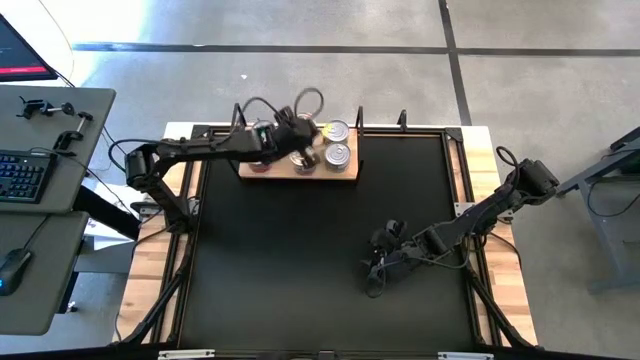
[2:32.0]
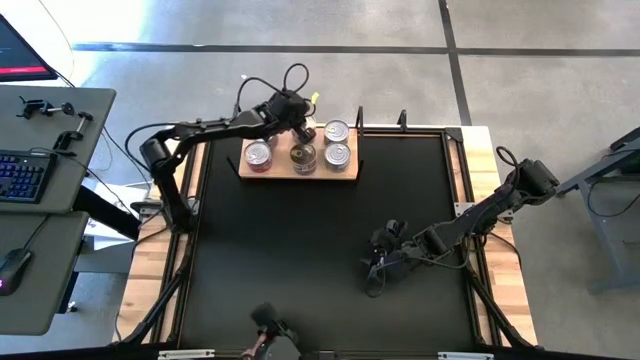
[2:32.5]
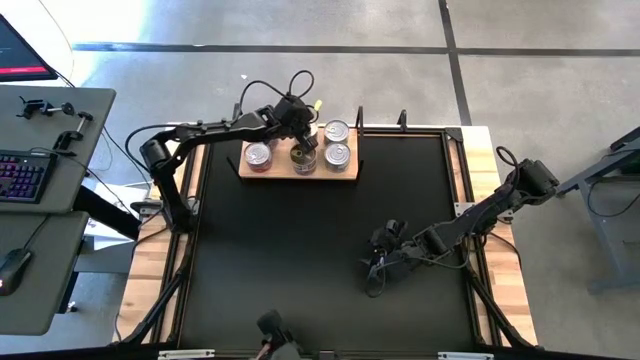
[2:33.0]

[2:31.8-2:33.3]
Task: Stack canned seafood by type on shelf
Adjust the blue and pink tuna cans on the shelf

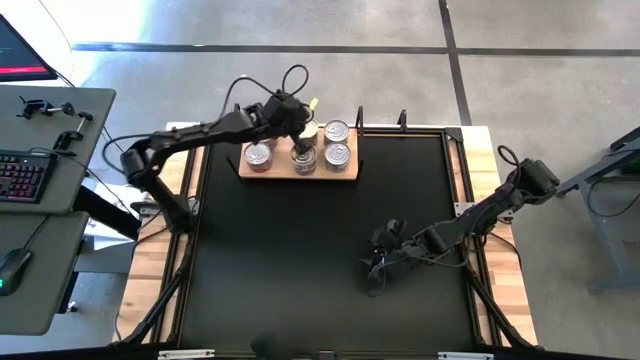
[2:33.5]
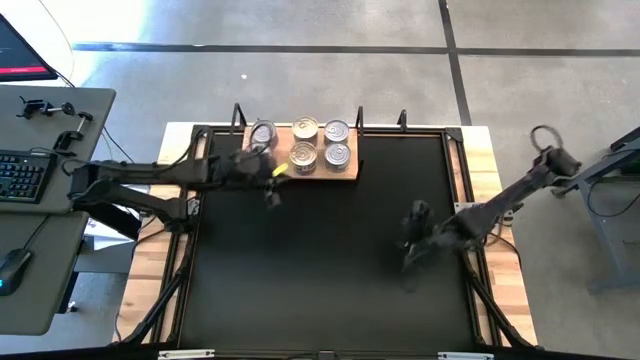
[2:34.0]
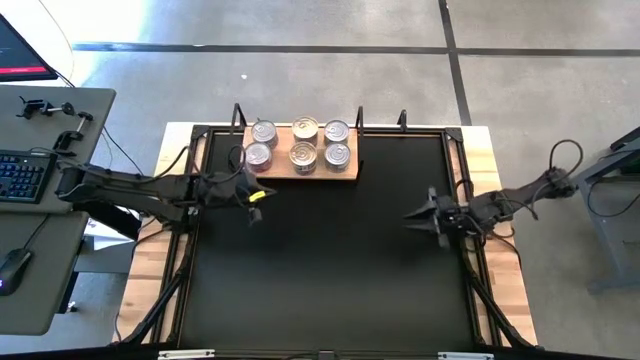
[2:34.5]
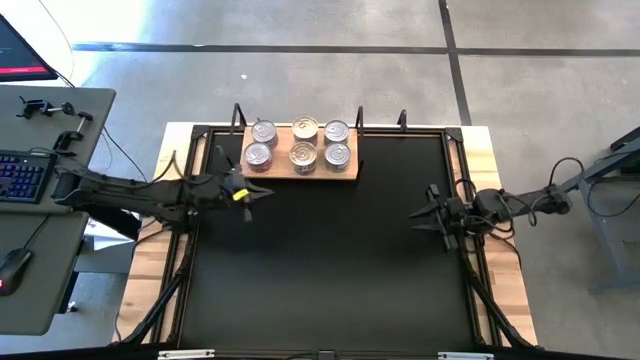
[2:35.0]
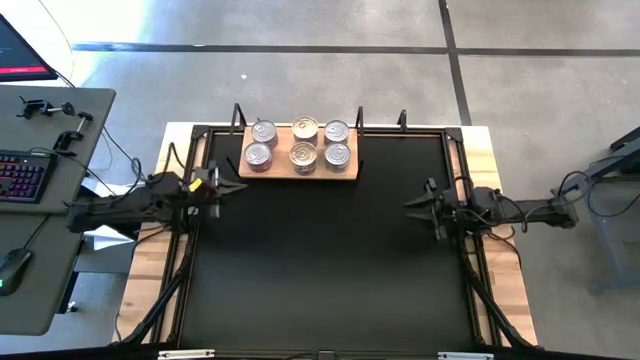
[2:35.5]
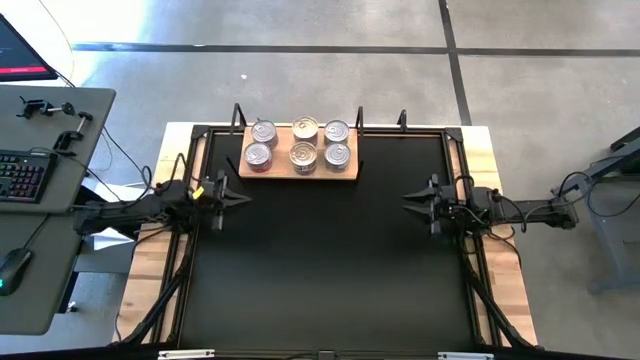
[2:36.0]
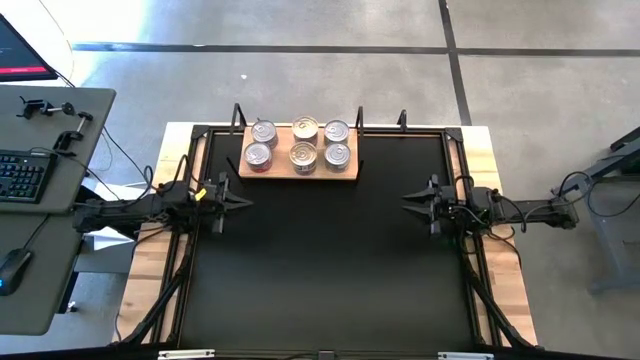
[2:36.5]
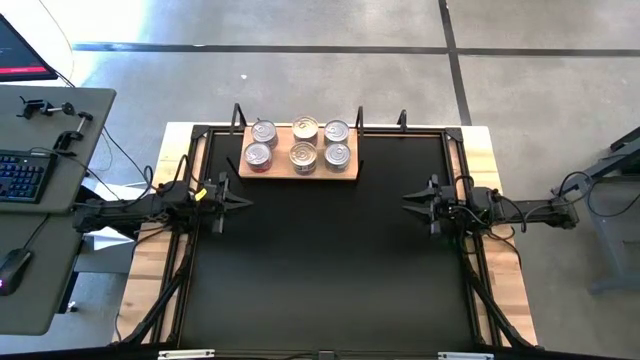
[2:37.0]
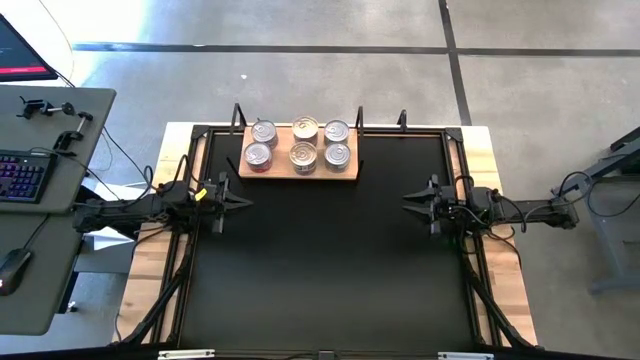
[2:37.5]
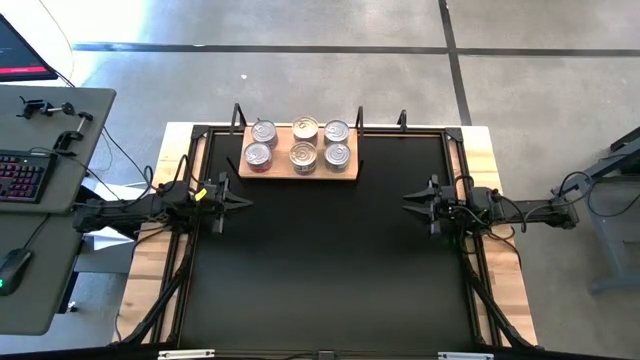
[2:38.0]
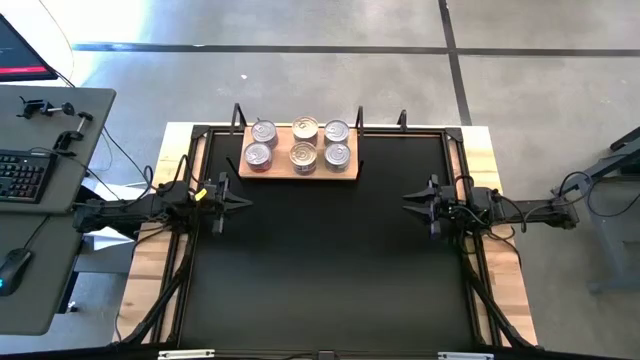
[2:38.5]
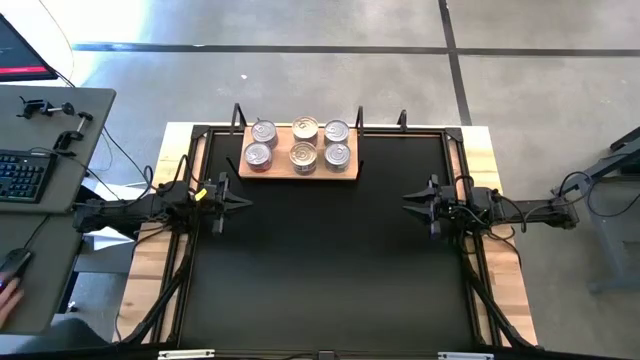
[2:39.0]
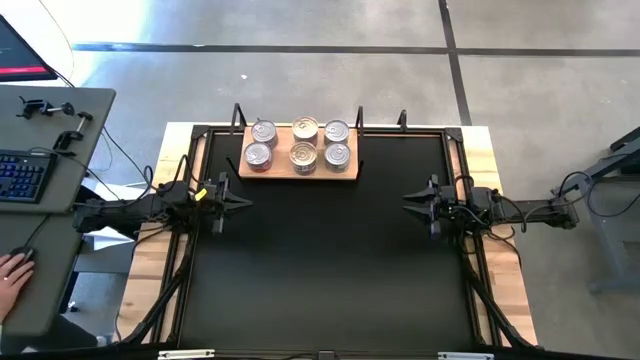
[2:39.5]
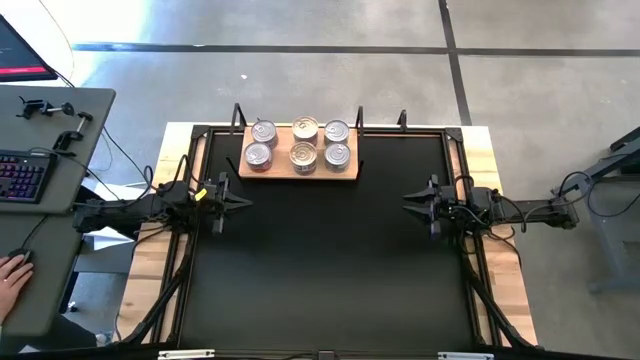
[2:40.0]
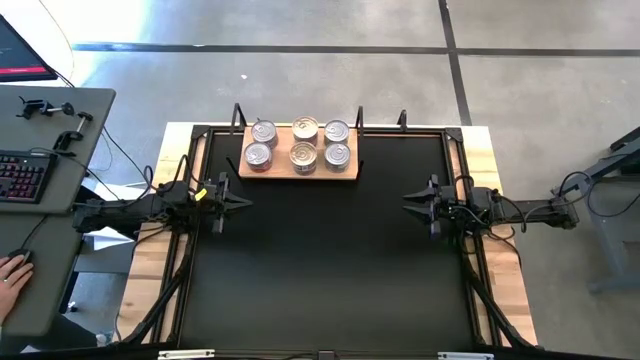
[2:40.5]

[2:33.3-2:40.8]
Return to Home Position

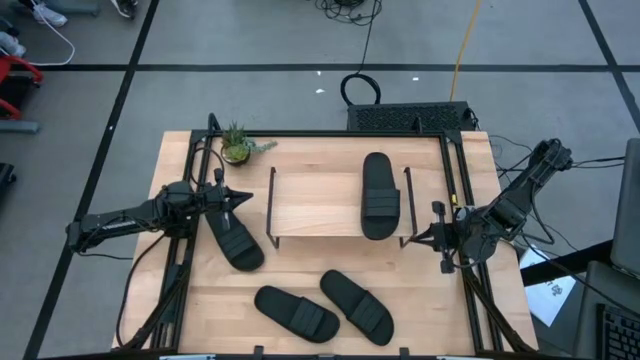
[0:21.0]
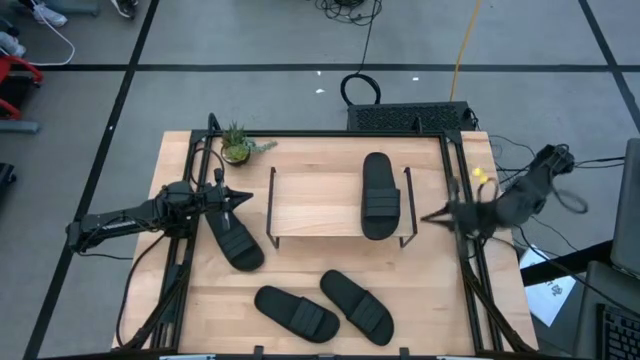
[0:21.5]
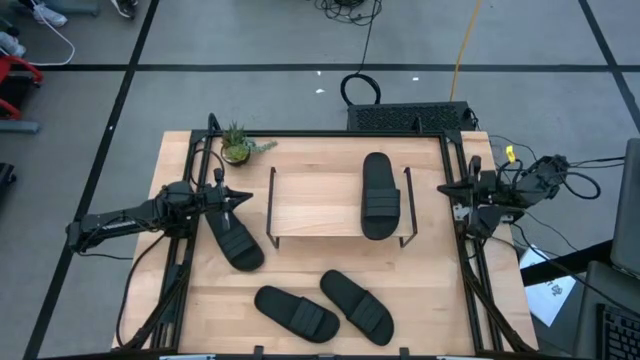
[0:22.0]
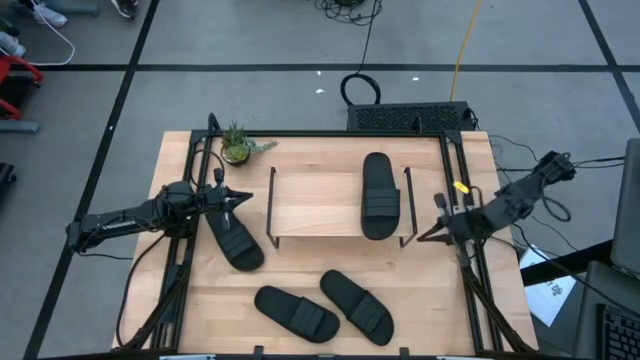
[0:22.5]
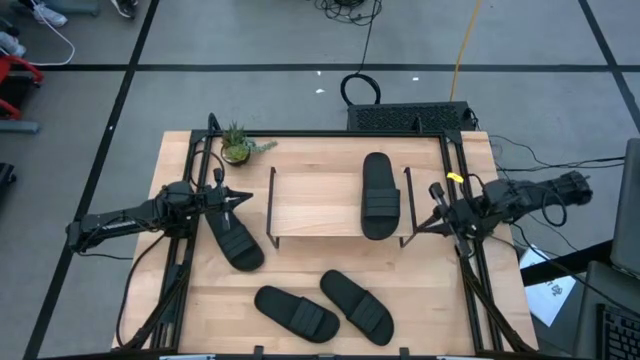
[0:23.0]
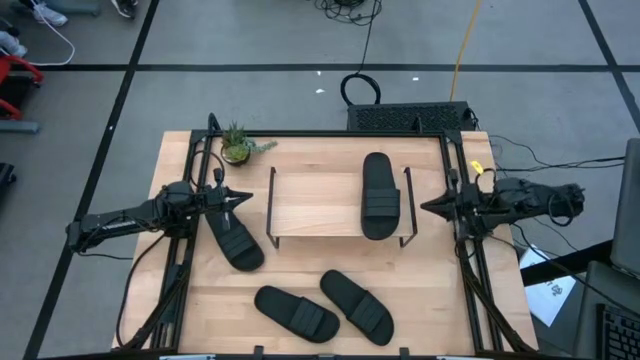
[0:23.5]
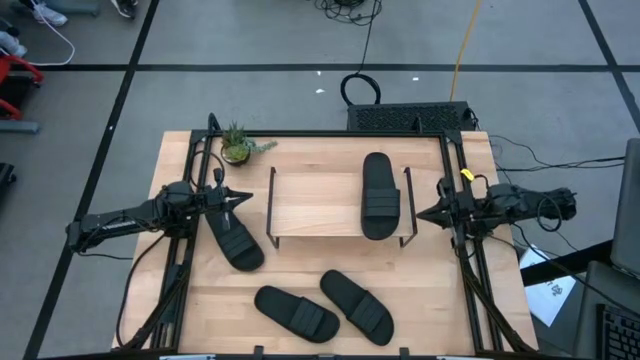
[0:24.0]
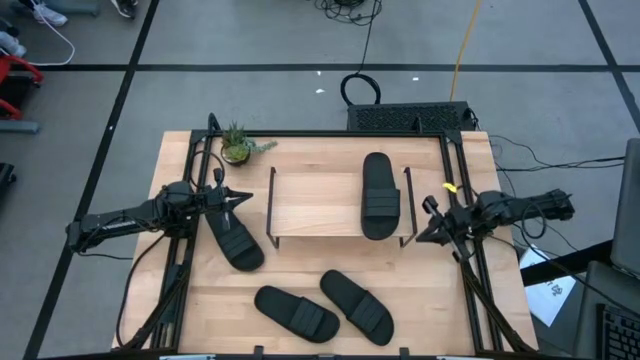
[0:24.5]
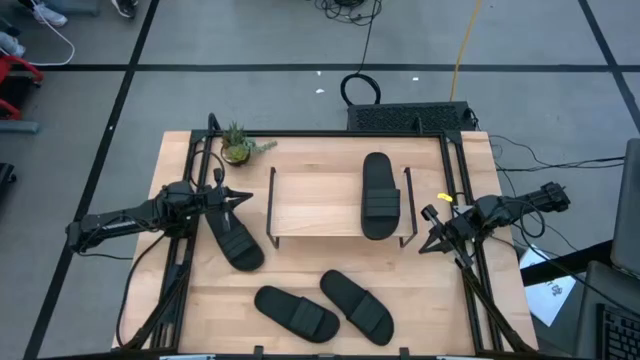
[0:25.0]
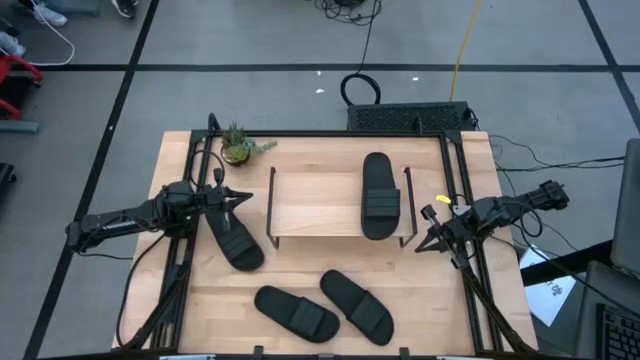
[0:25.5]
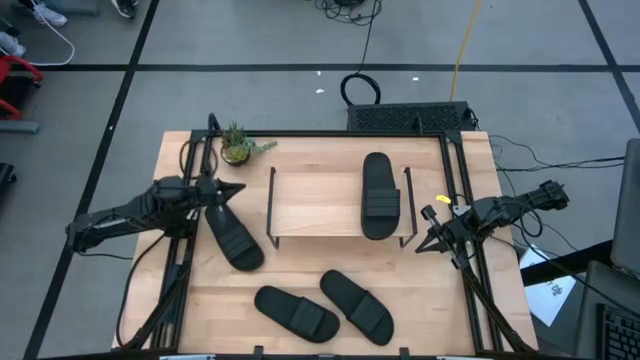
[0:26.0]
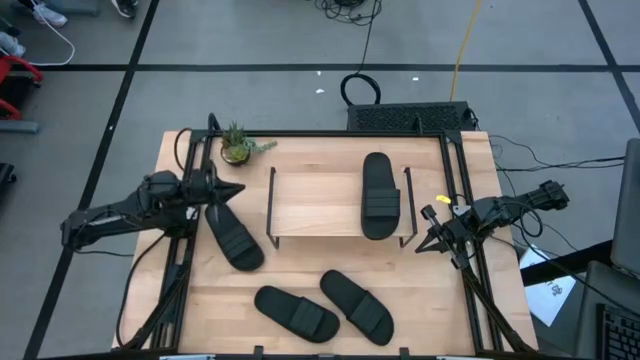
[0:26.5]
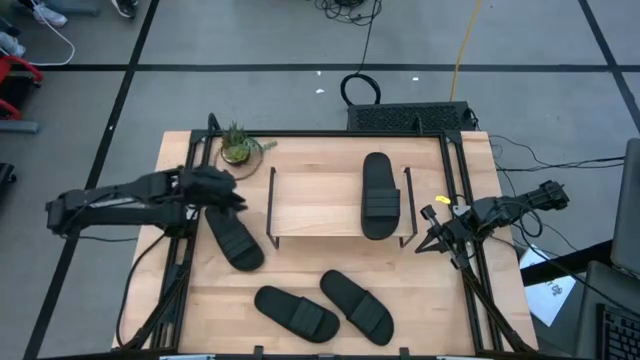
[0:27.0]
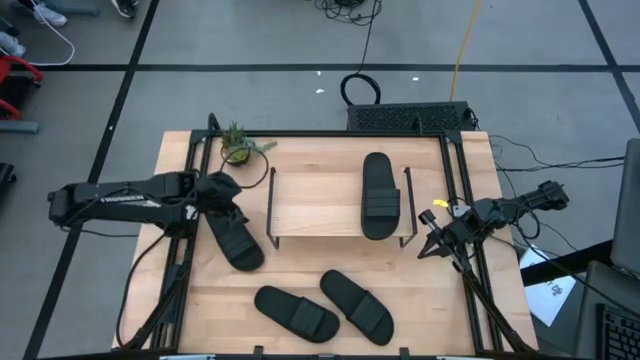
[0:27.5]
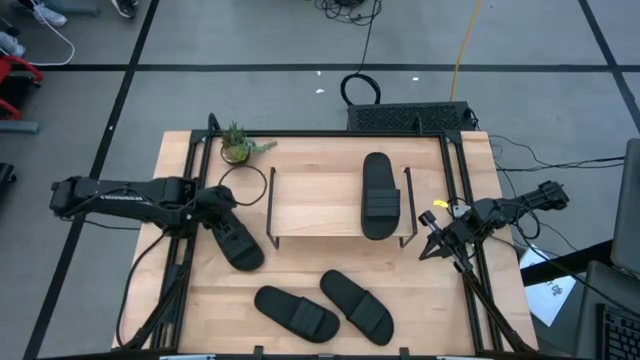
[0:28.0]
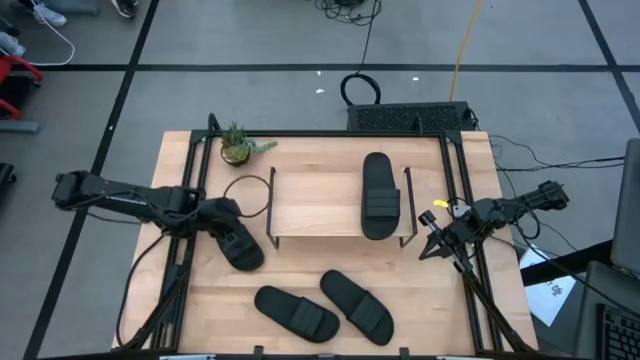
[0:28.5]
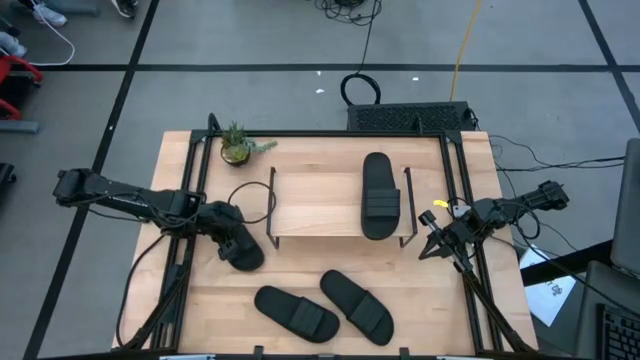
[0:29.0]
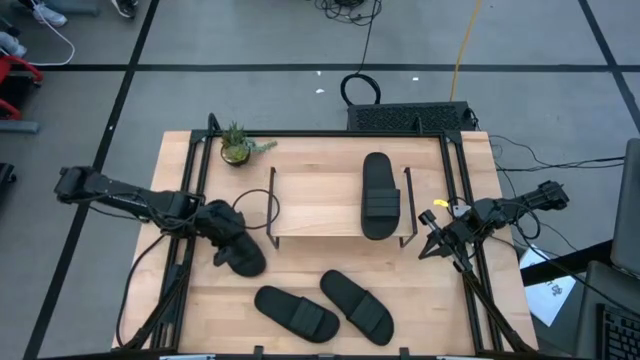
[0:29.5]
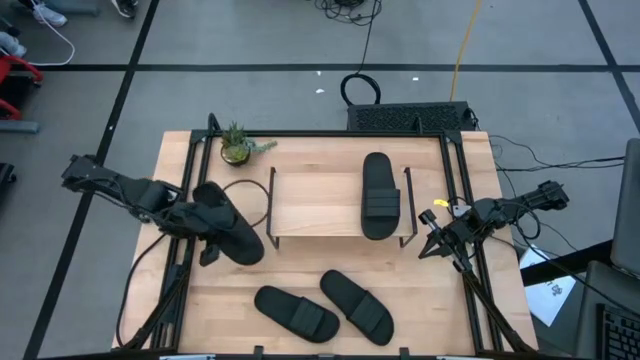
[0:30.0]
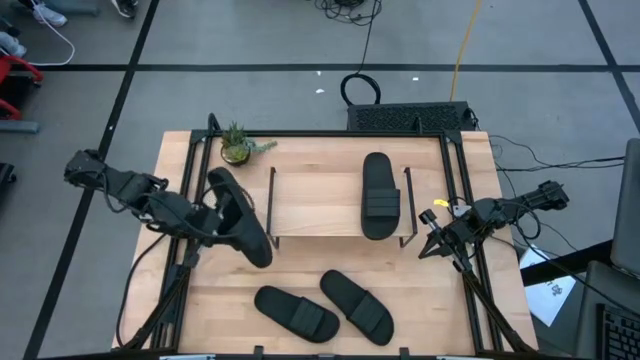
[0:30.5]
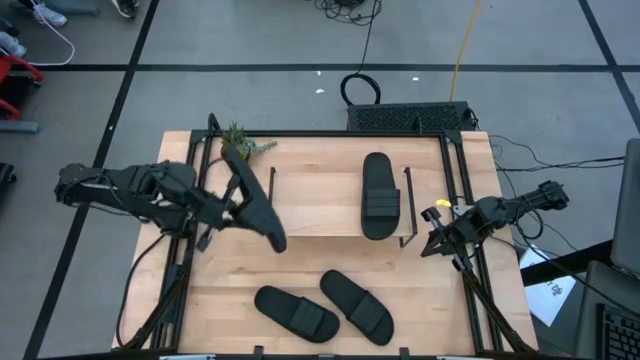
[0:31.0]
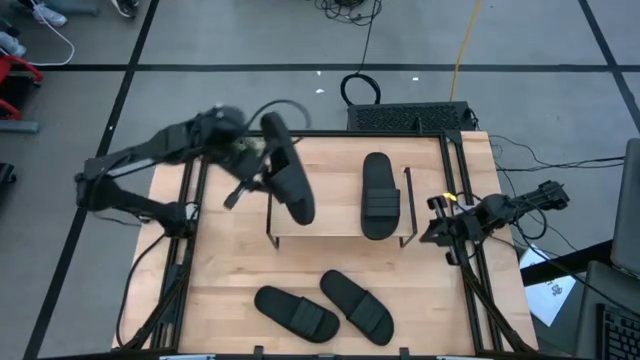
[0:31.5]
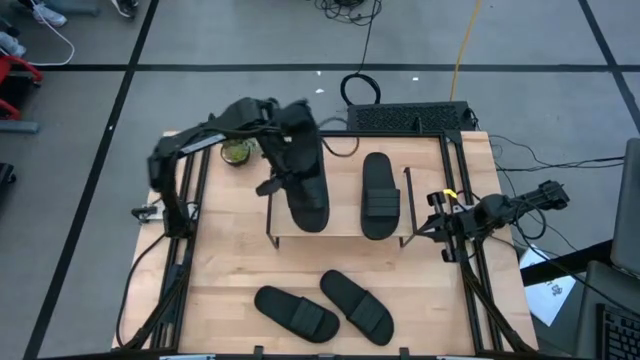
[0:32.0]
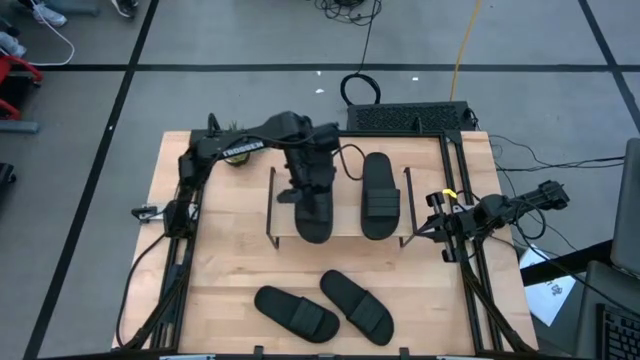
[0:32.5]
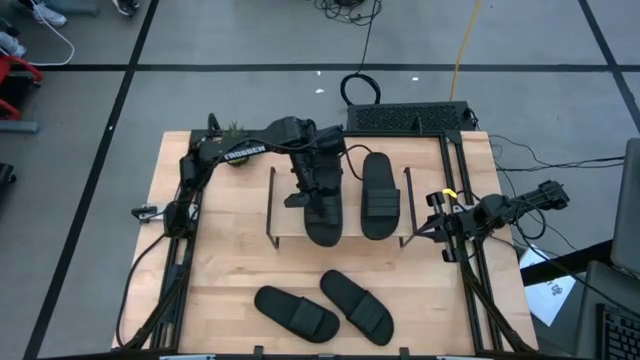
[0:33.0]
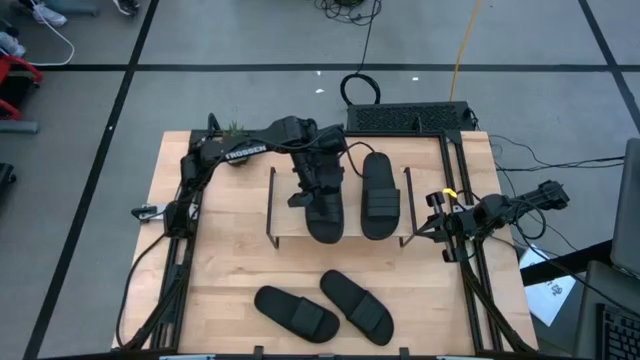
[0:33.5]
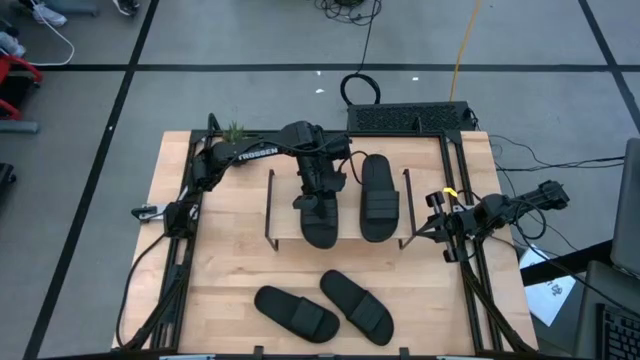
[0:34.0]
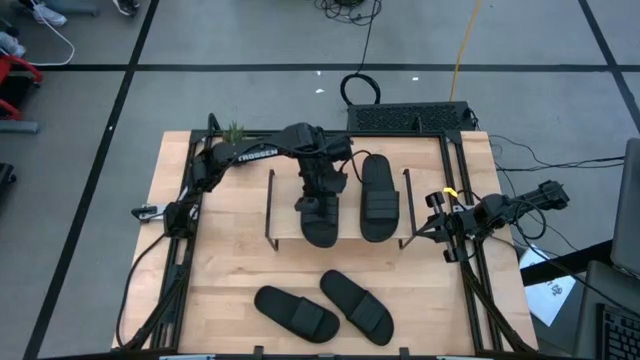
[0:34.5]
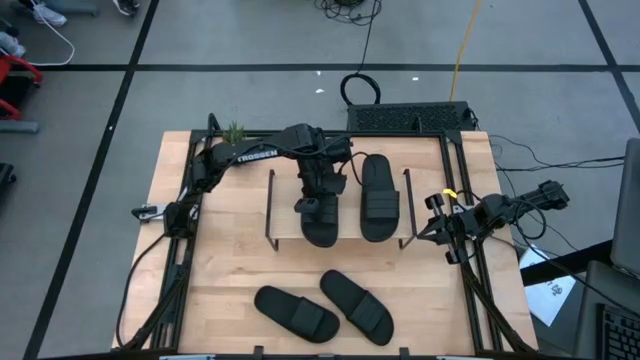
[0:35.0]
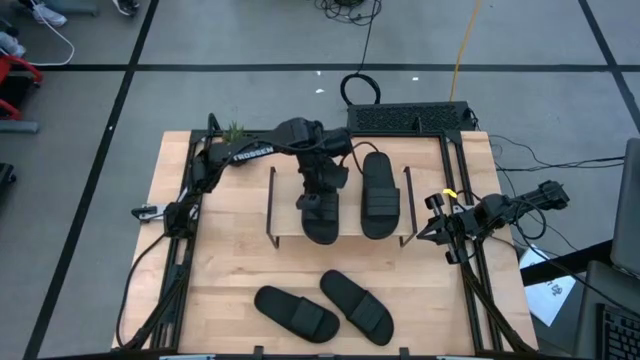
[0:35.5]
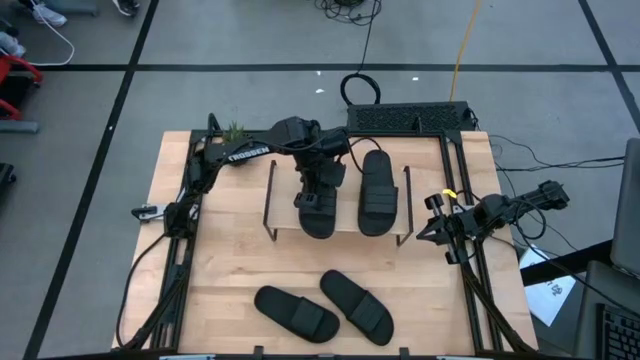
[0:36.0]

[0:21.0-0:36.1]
Task: Pick and place slides into the shelf
Put the black slipper on the shelf
